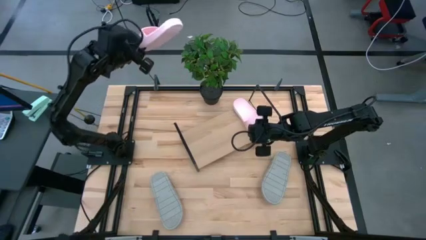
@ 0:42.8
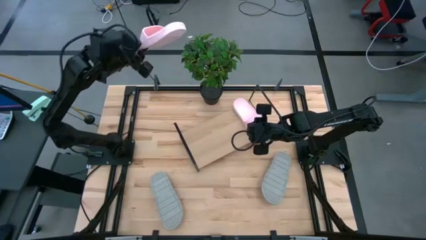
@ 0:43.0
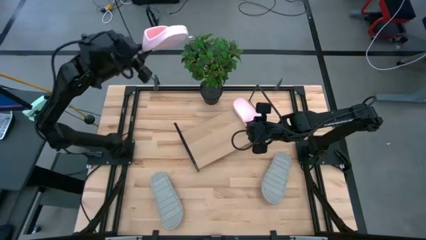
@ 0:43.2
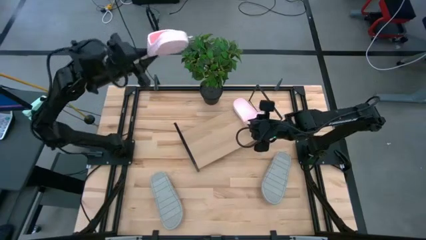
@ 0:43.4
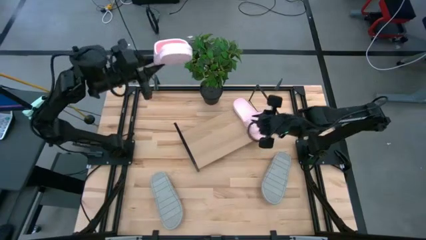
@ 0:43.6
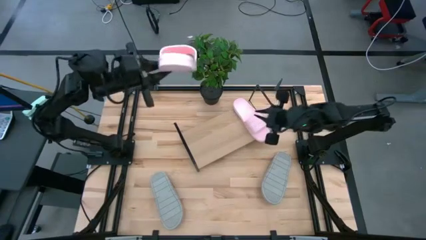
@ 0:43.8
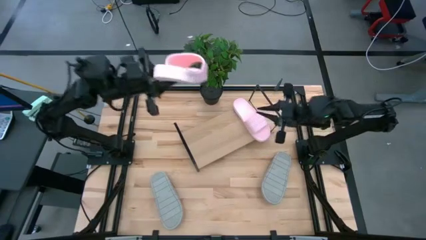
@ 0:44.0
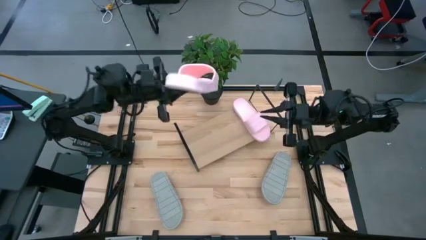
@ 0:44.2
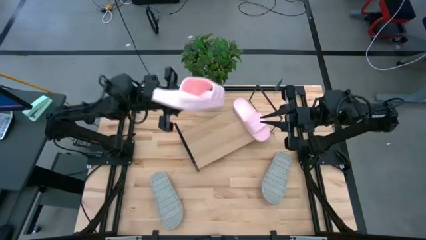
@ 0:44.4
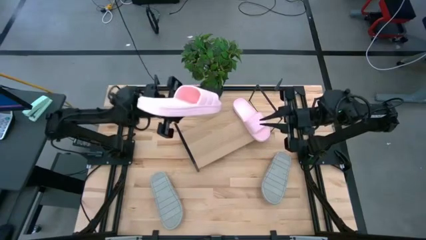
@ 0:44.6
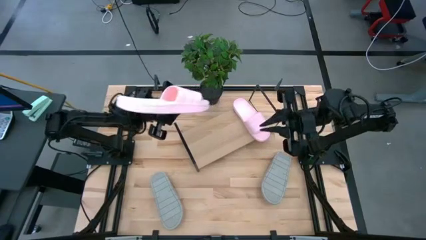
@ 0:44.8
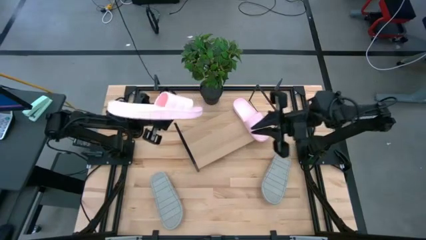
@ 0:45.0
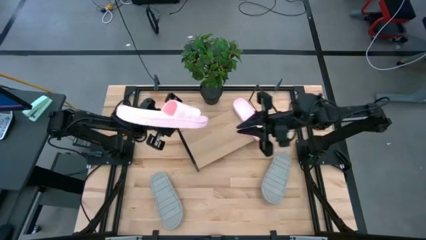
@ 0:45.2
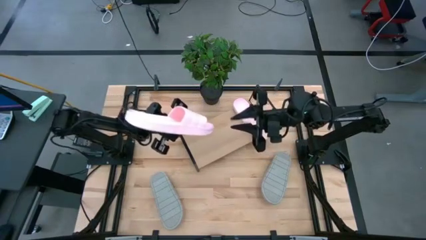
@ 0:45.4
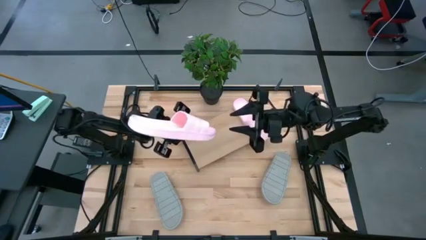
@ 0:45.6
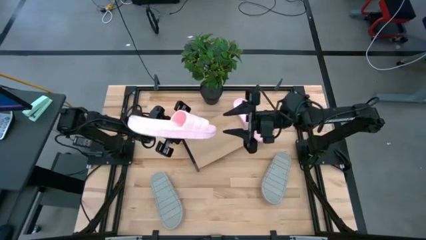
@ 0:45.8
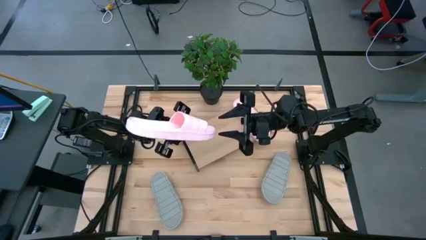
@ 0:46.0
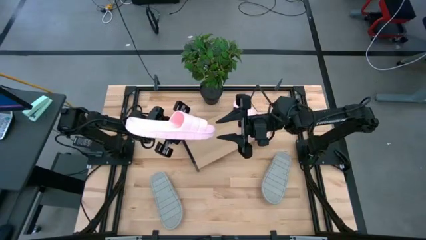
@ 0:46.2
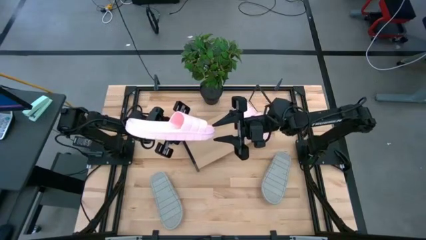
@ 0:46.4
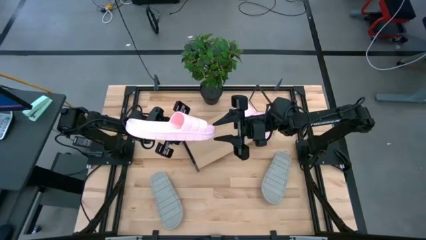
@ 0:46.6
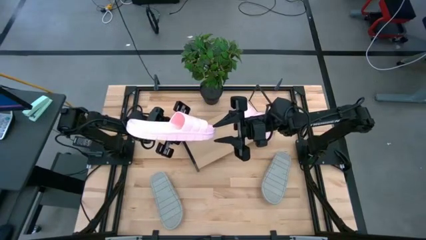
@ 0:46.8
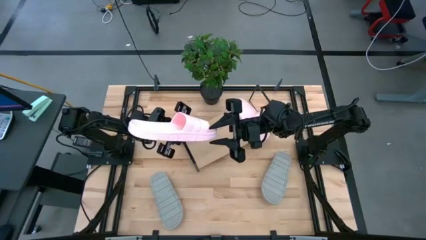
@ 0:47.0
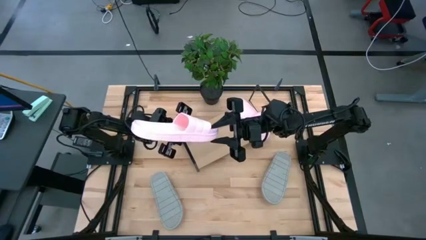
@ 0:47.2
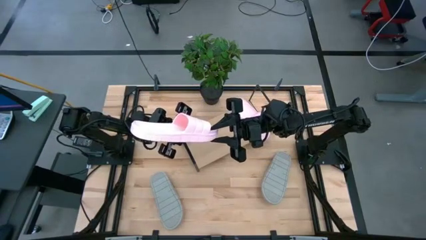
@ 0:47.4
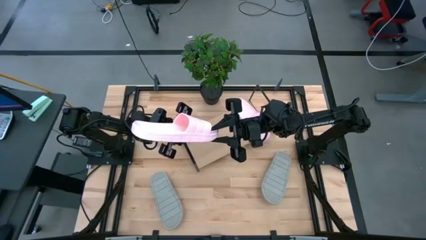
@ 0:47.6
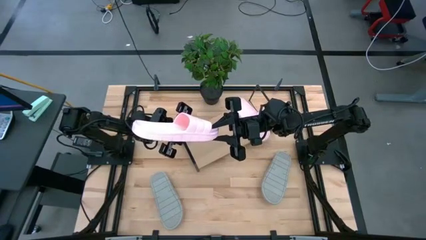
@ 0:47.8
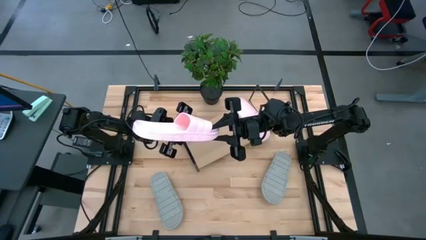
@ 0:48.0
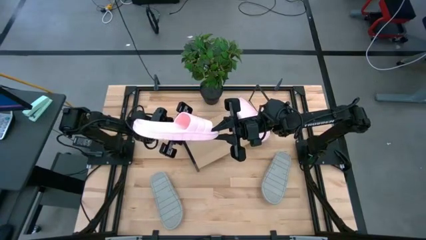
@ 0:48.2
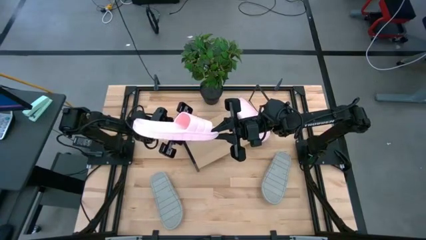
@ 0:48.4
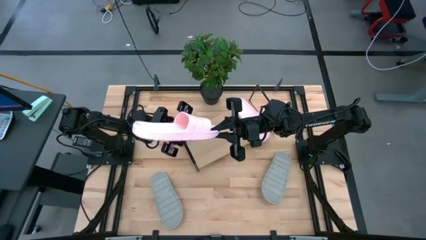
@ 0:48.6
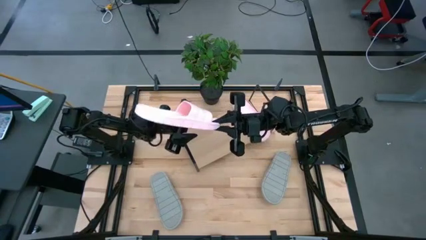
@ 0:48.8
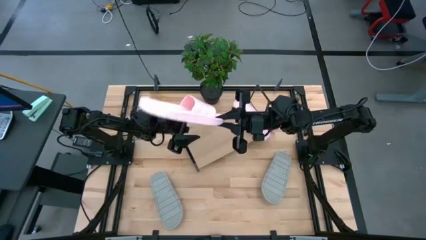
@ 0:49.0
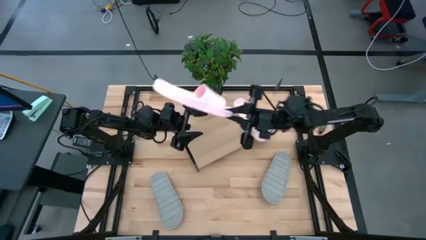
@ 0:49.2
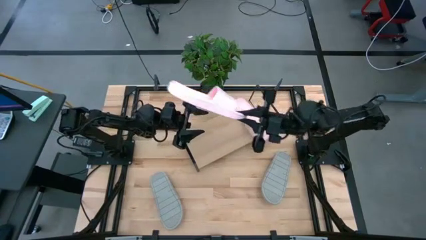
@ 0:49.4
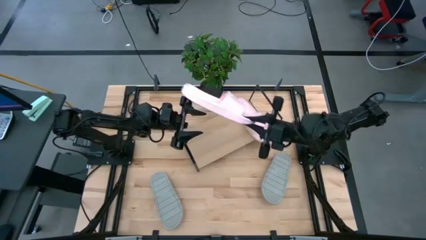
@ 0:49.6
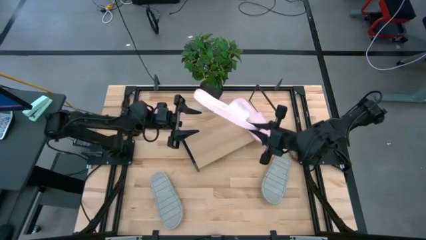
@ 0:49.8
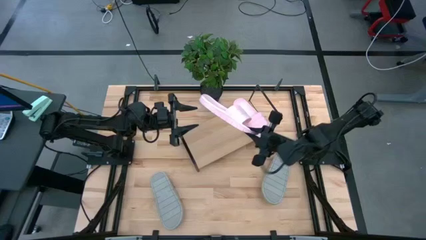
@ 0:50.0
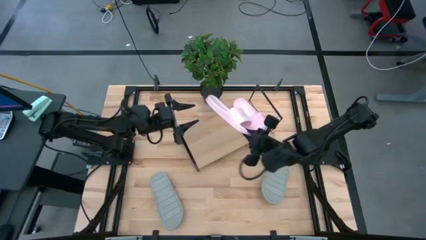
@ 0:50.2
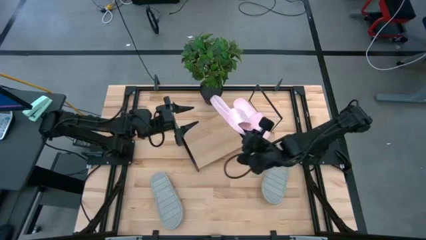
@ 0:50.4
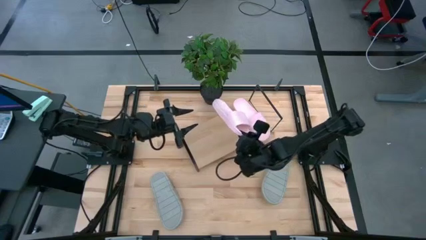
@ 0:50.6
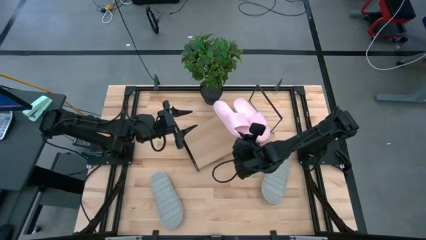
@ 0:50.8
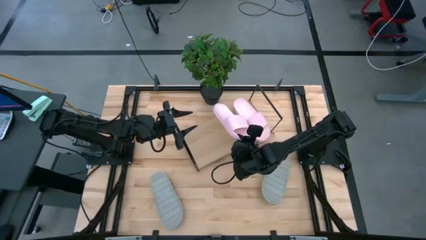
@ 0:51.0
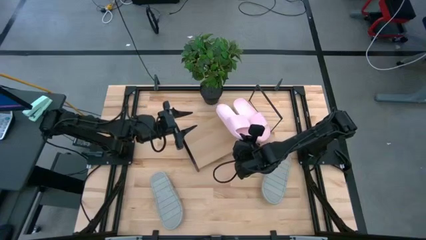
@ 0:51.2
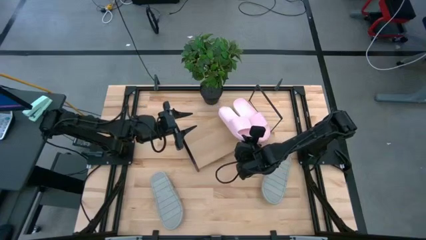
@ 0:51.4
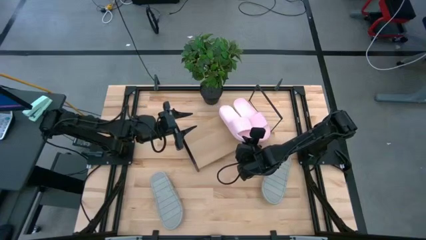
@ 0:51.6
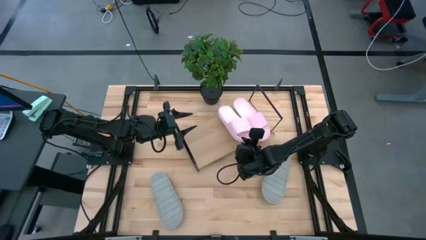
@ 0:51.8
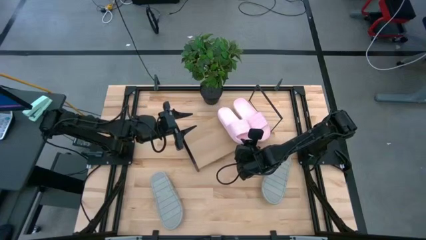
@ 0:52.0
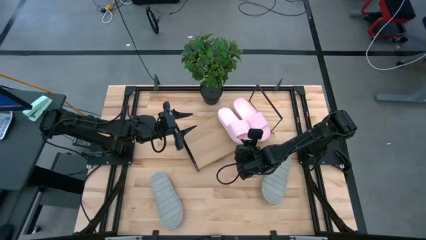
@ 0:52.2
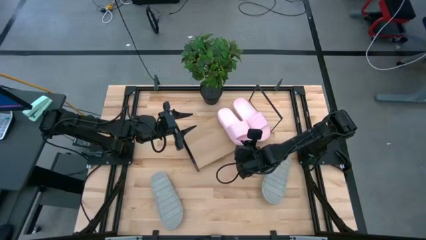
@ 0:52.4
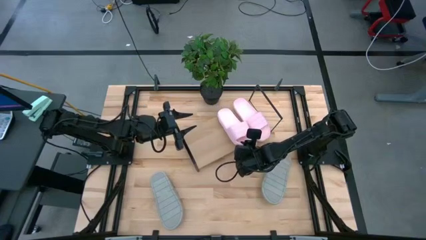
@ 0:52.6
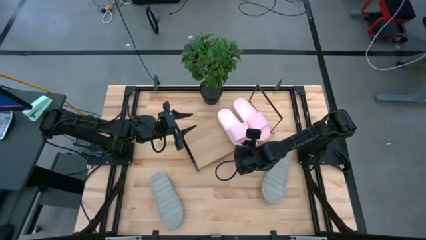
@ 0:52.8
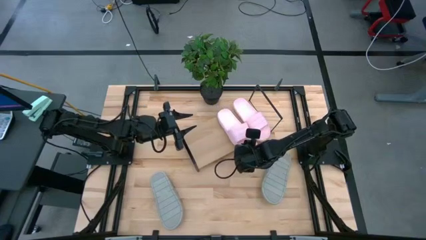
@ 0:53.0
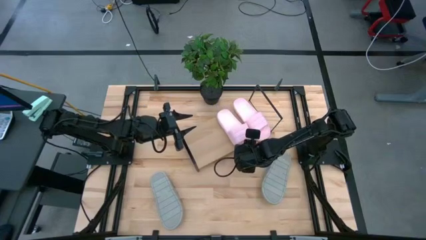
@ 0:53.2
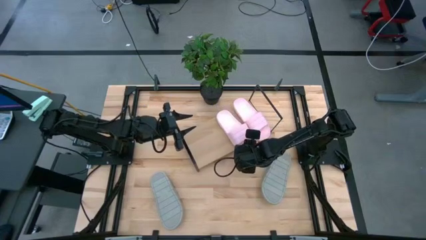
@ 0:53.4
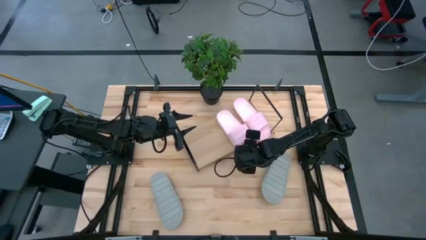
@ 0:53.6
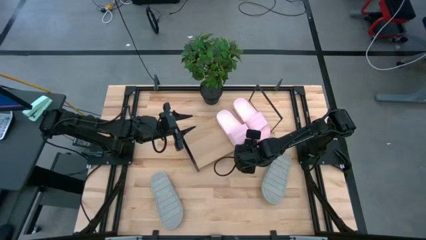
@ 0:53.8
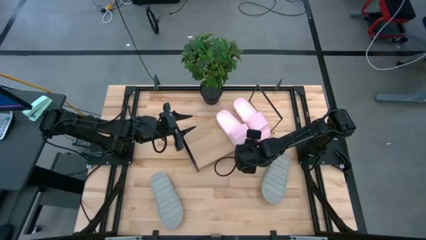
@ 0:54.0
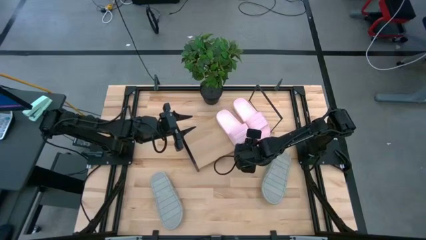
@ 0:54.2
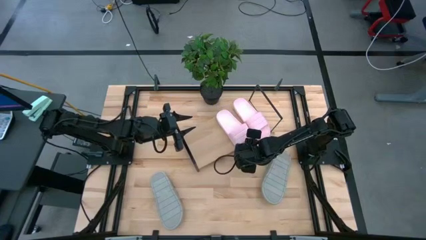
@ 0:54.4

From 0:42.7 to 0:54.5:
Task: Pick and place slides into the shelf
Put the pink slipper on the shelf
